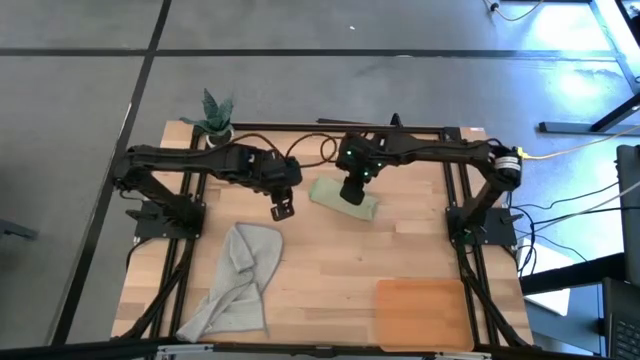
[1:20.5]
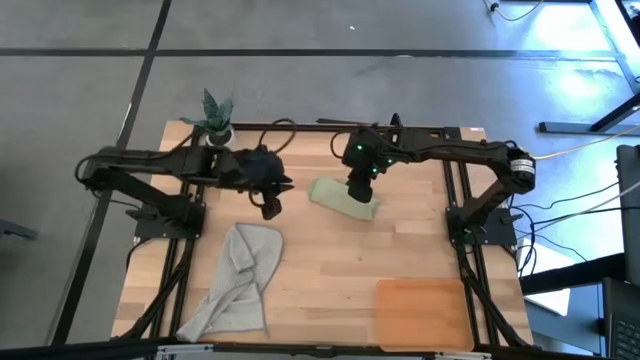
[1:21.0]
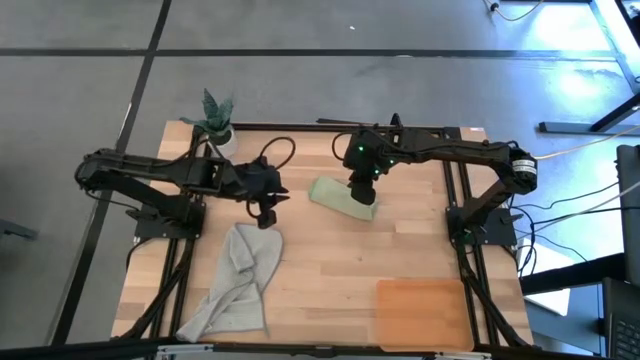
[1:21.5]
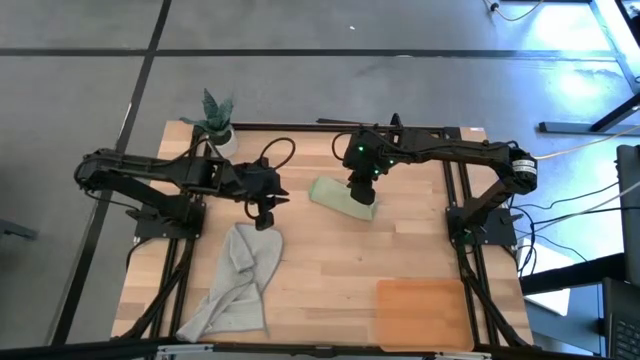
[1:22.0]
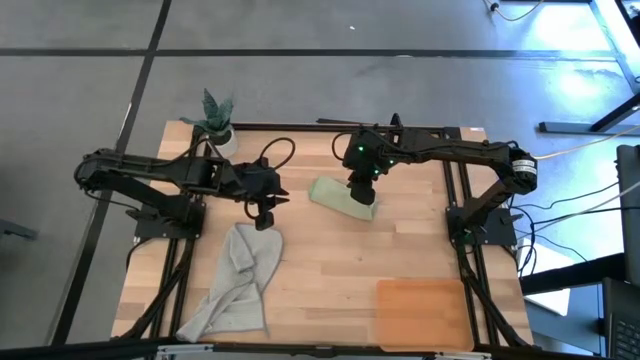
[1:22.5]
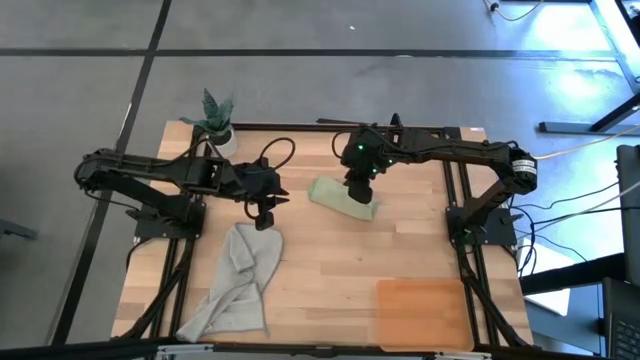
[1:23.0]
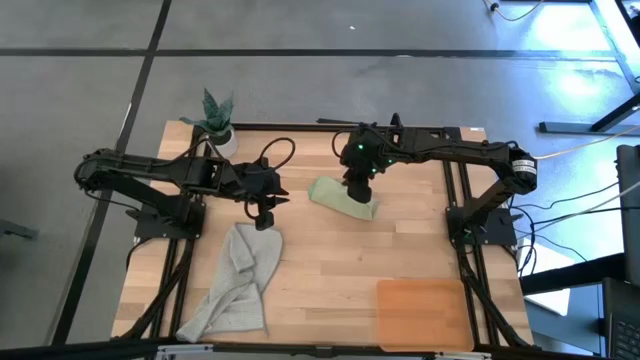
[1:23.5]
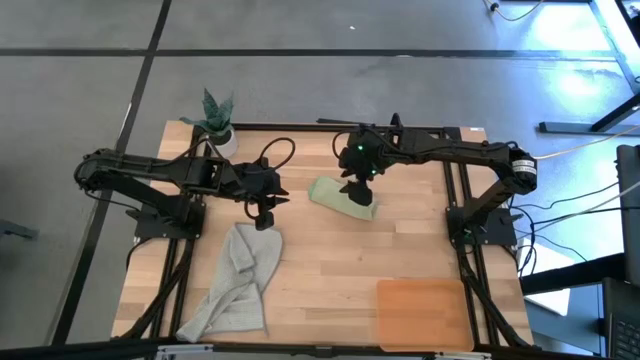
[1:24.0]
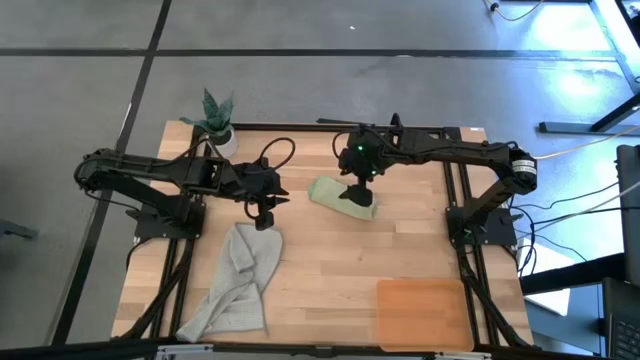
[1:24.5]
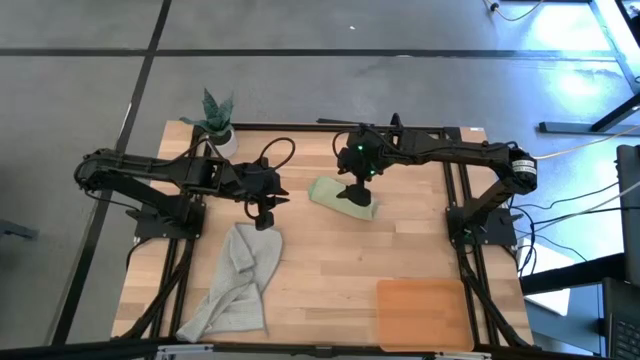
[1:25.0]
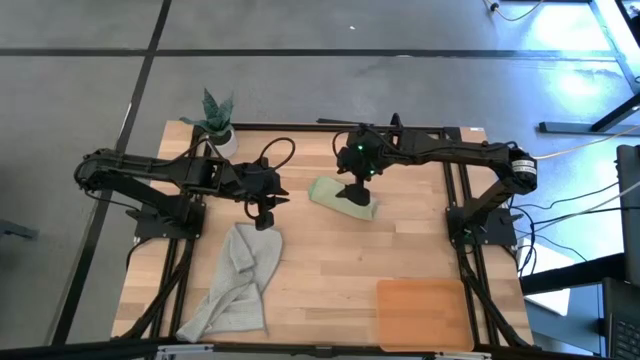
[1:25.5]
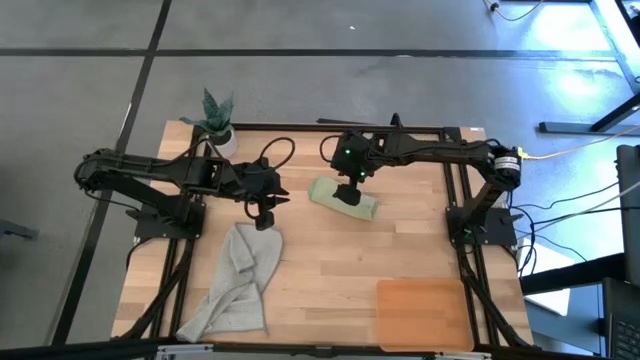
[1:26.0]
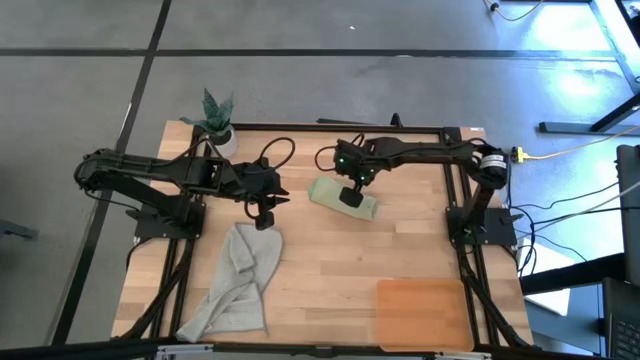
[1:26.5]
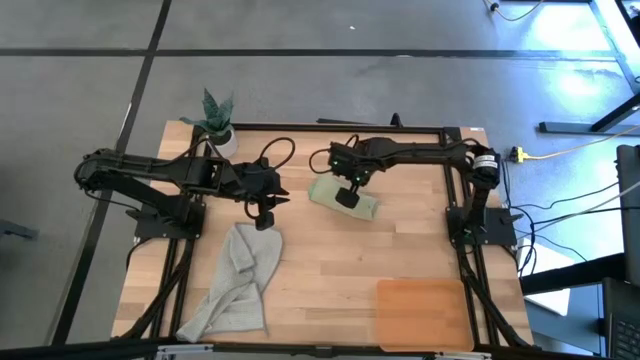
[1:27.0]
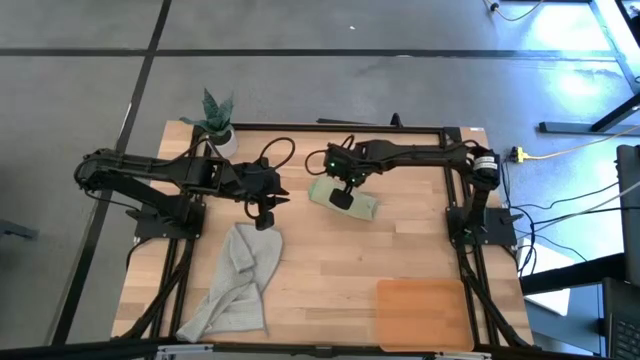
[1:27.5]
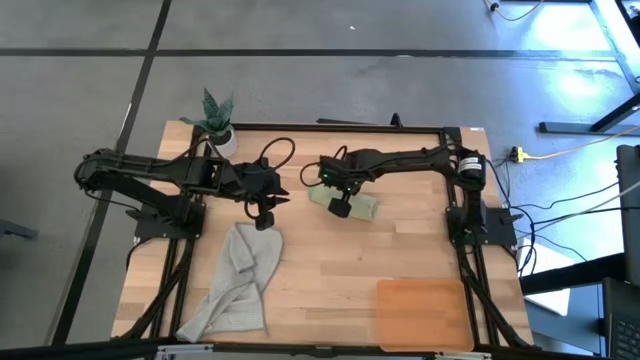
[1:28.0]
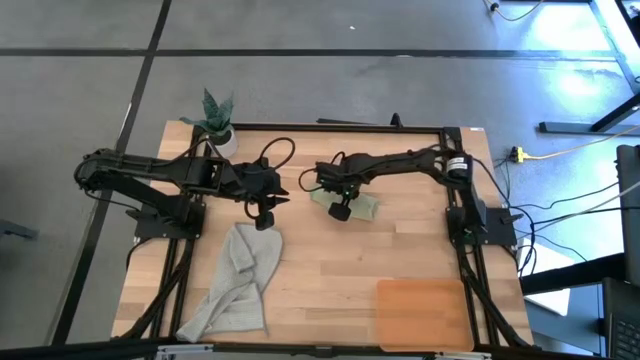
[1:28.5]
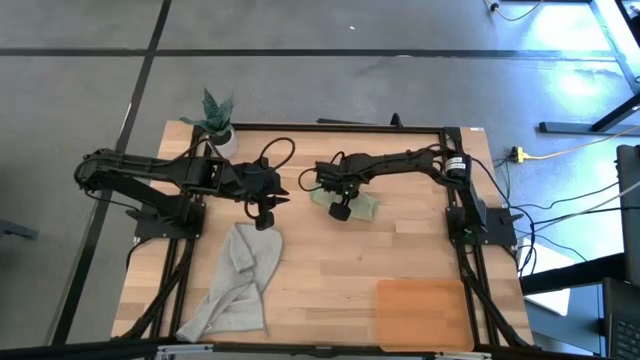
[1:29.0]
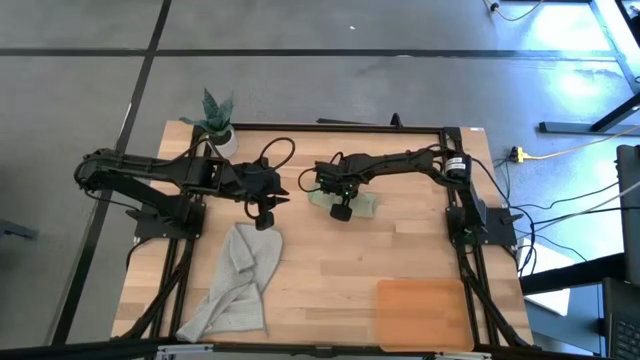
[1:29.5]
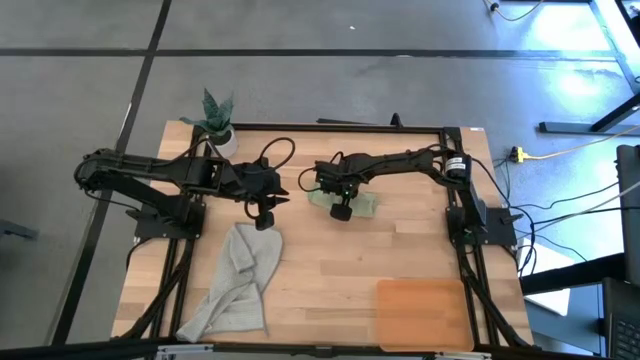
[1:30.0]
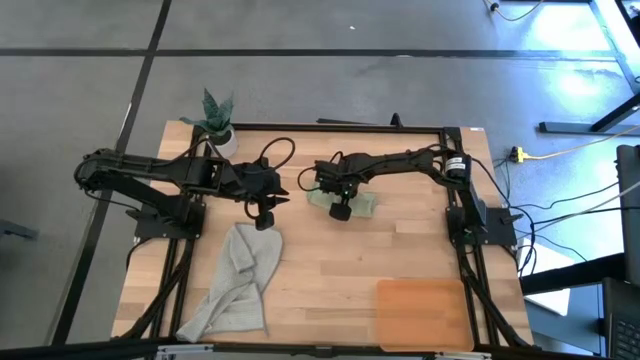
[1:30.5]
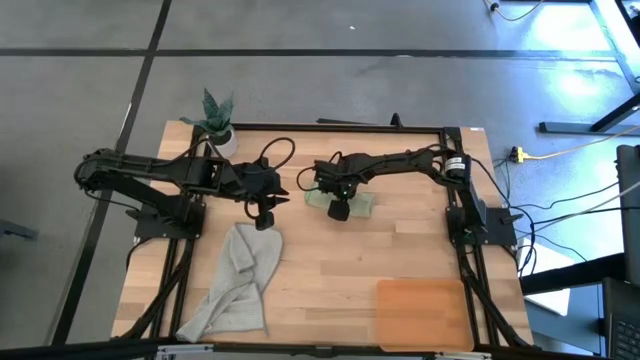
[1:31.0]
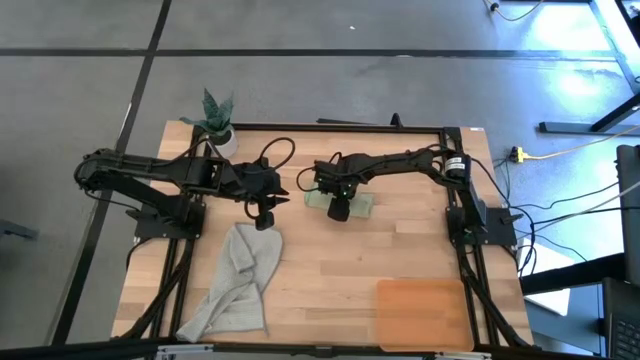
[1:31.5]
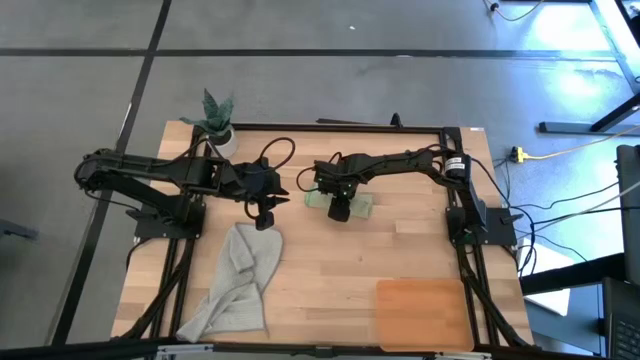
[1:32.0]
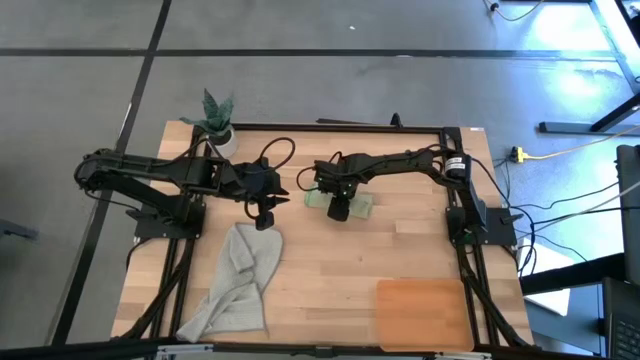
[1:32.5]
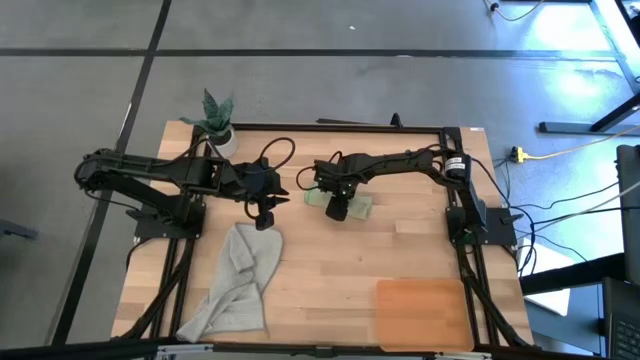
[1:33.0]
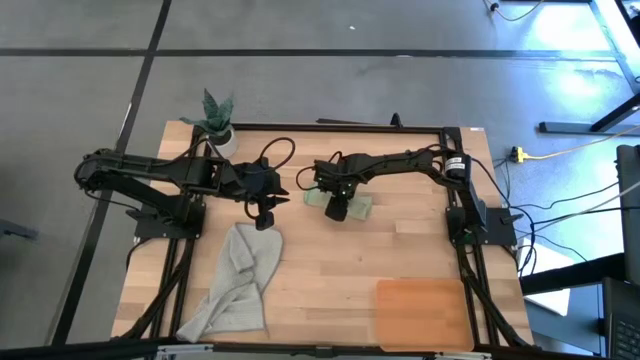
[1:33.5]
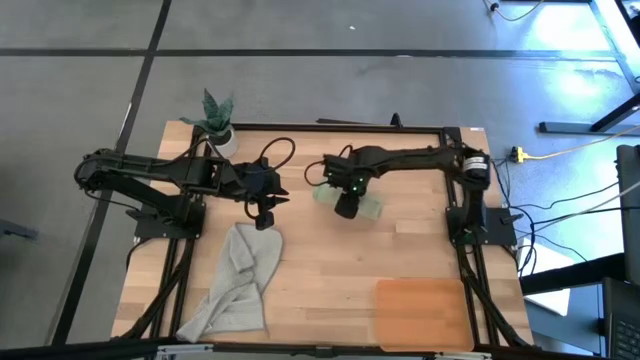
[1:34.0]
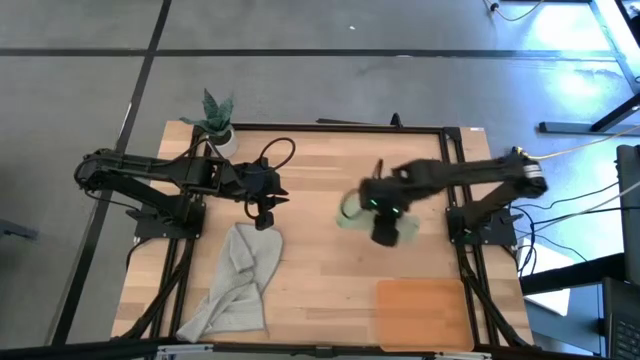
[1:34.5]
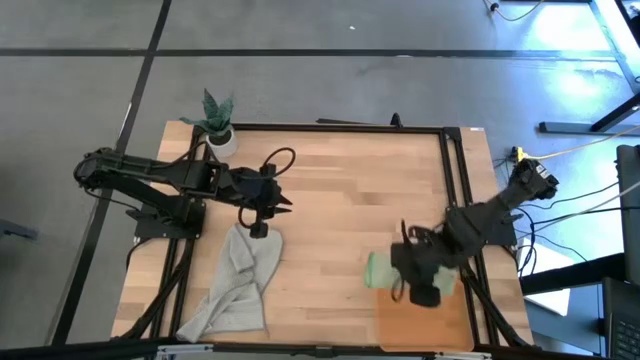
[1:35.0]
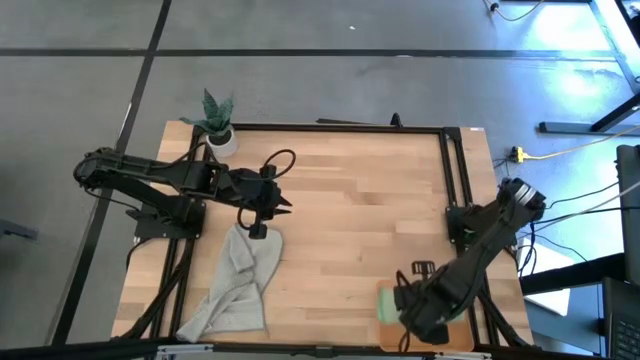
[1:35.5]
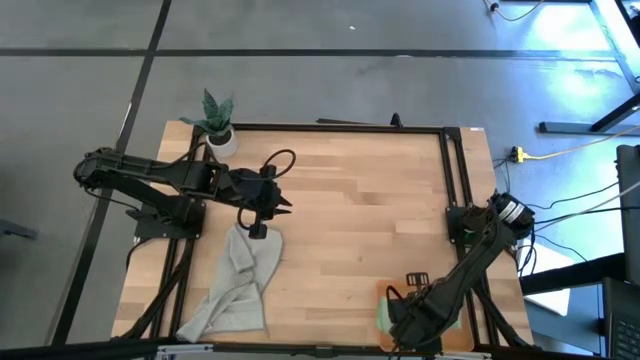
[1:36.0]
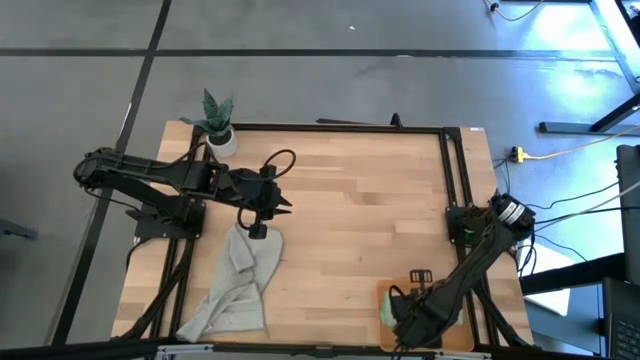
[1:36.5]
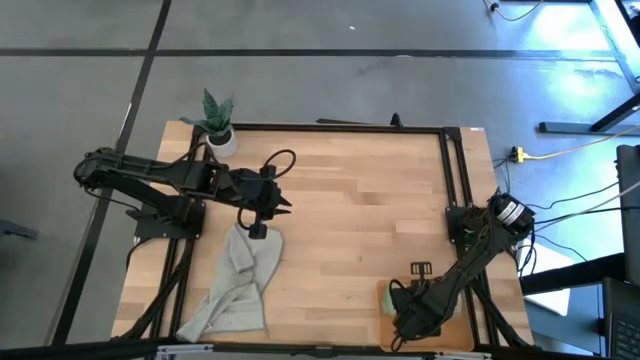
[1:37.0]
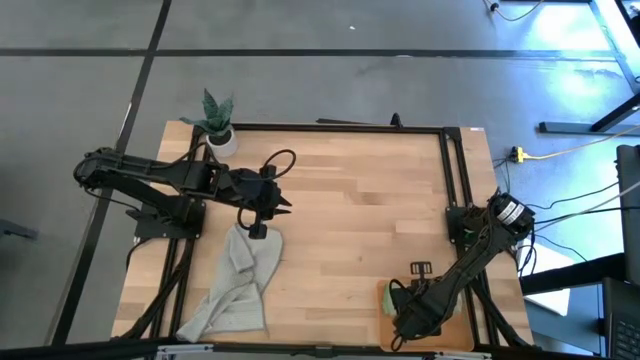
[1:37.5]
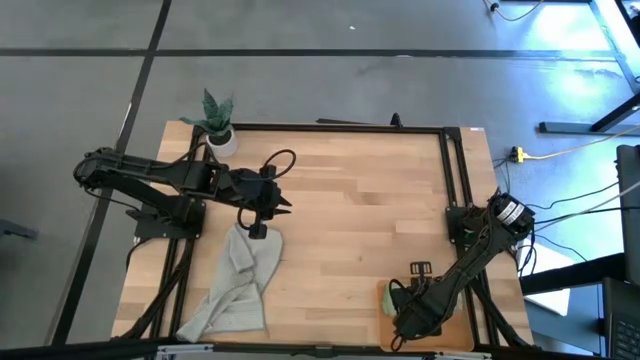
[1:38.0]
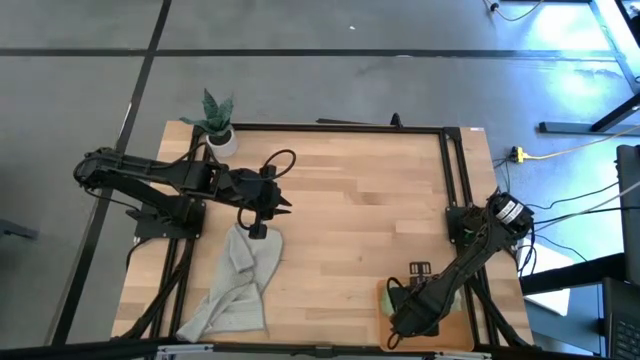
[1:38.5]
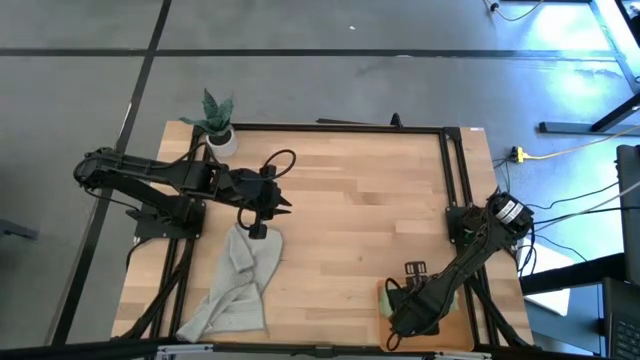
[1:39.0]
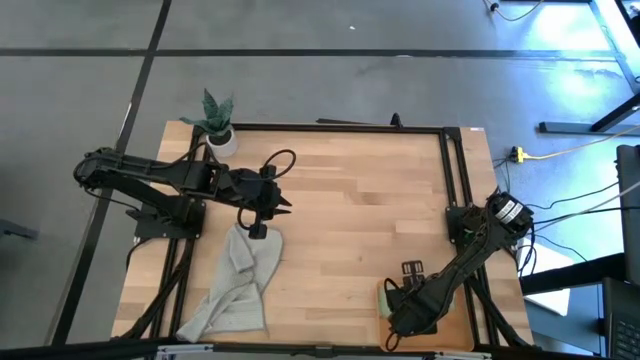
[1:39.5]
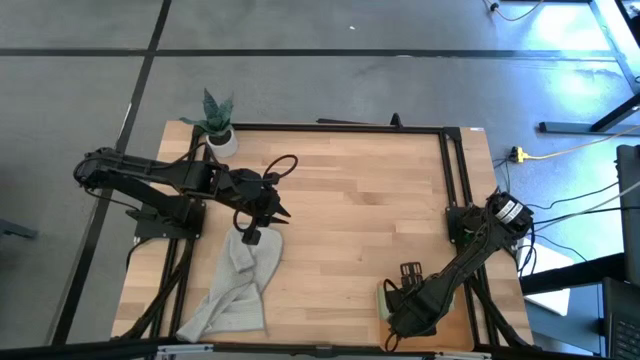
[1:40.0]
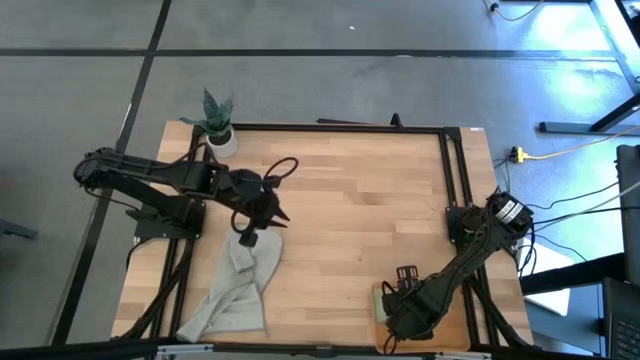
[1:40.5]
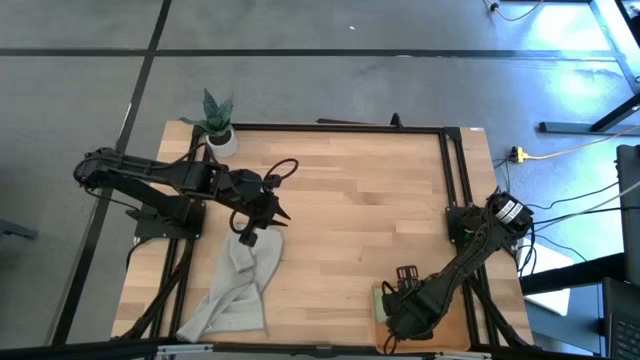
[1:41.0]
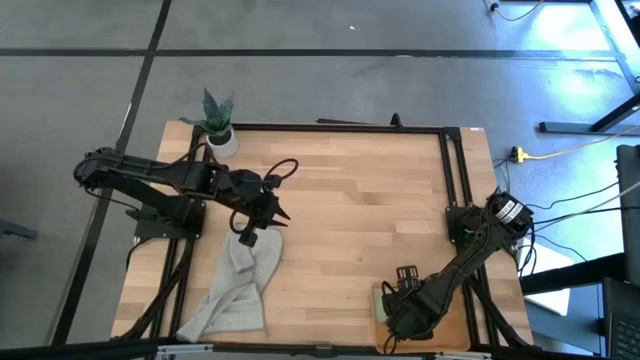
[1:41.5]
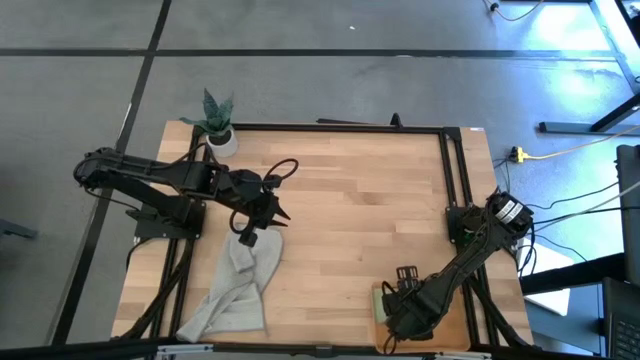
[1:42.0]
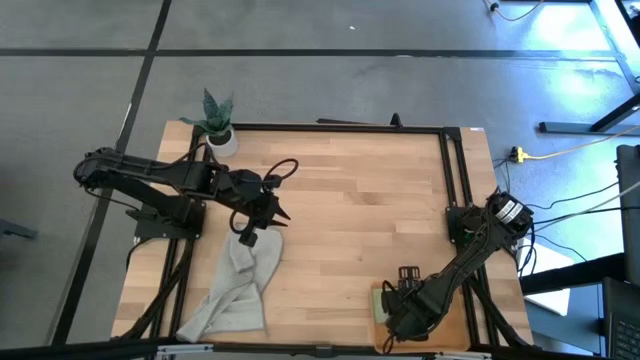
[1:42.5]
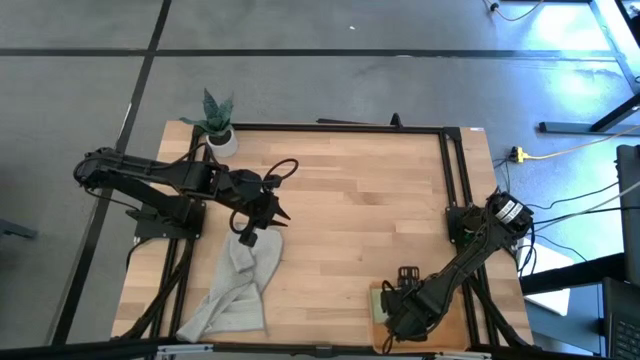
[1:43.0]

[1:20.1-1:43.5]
Task: Roll microfiber towels into tight, uniform cylinder then place into a basket
Put the green microfiber cloth into the orange bin
